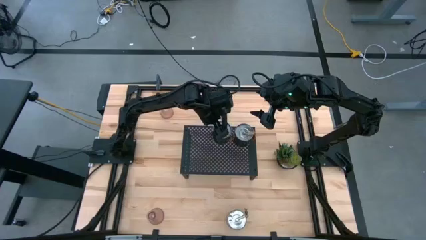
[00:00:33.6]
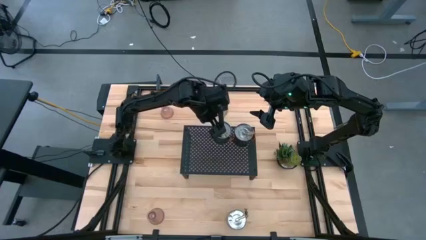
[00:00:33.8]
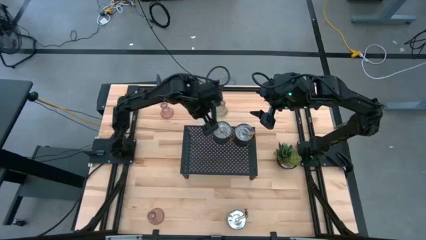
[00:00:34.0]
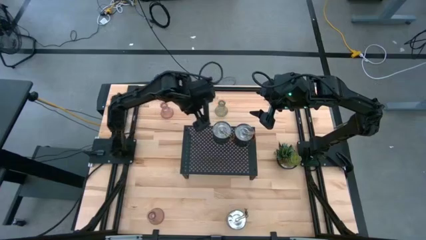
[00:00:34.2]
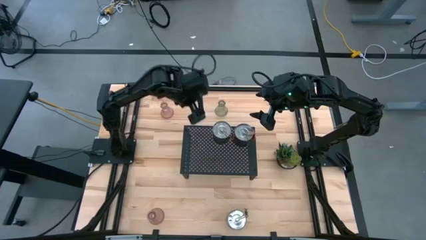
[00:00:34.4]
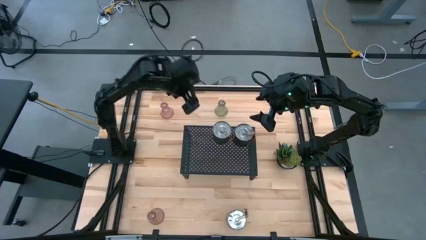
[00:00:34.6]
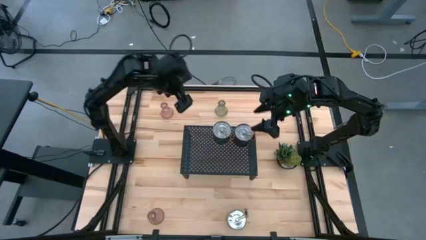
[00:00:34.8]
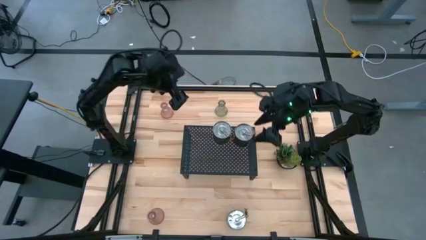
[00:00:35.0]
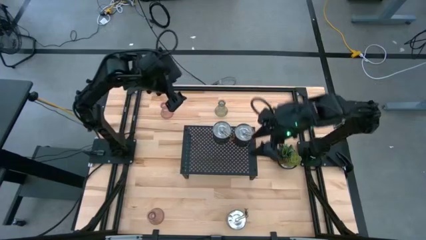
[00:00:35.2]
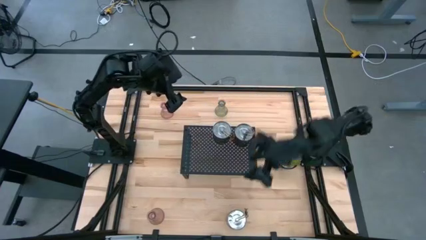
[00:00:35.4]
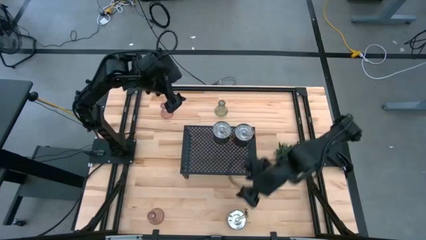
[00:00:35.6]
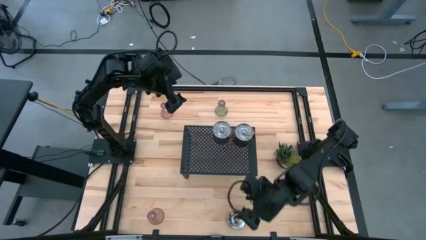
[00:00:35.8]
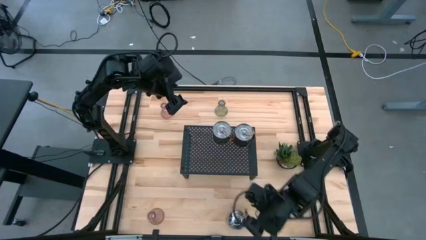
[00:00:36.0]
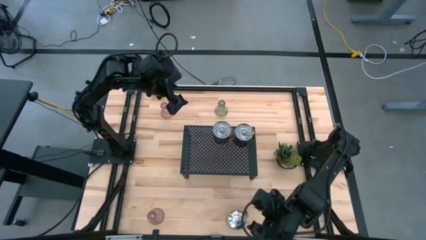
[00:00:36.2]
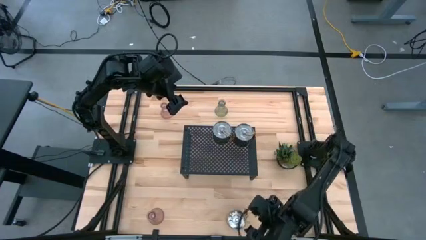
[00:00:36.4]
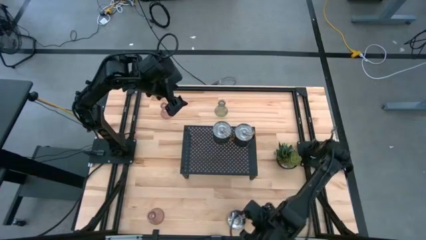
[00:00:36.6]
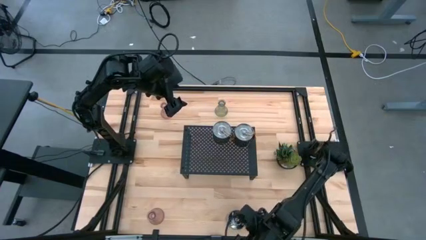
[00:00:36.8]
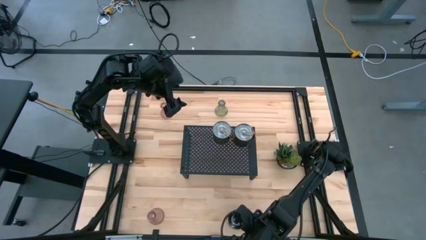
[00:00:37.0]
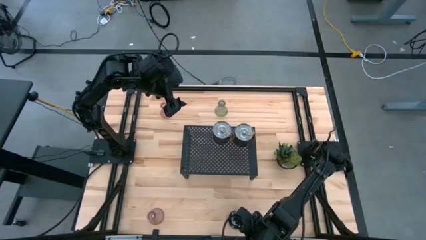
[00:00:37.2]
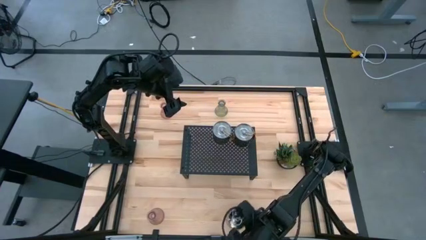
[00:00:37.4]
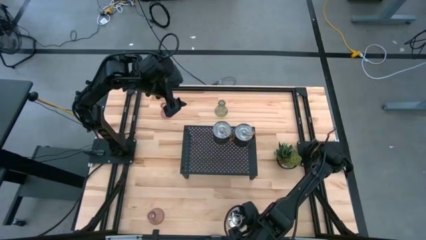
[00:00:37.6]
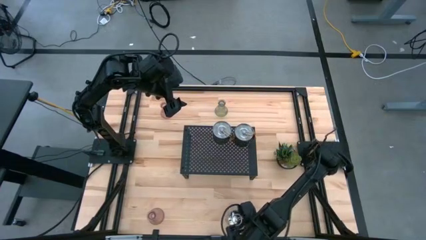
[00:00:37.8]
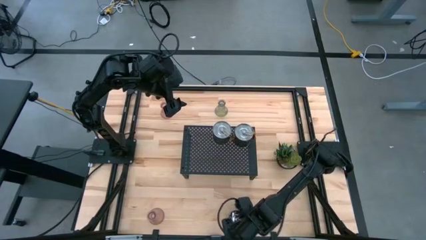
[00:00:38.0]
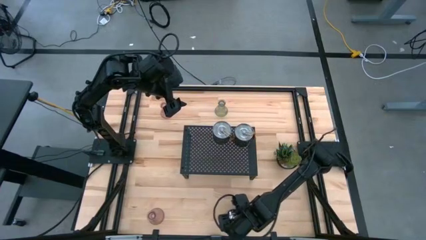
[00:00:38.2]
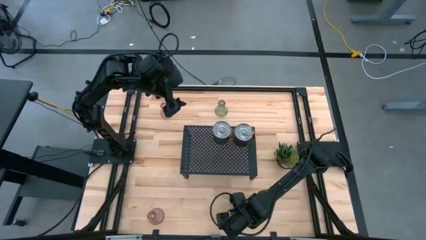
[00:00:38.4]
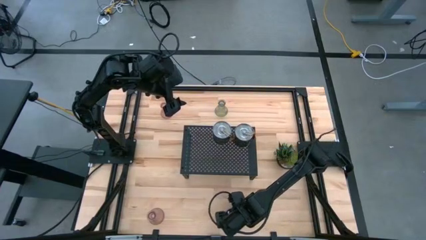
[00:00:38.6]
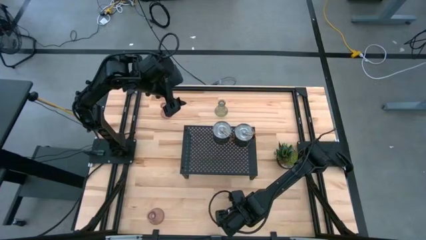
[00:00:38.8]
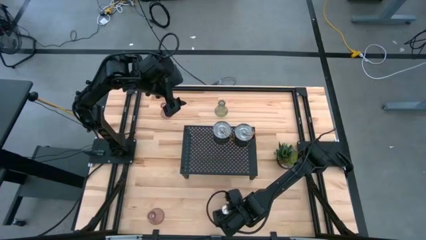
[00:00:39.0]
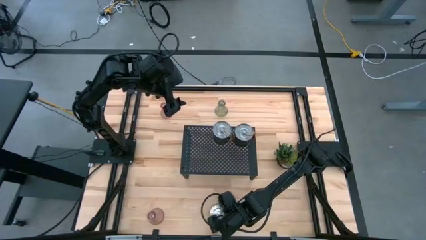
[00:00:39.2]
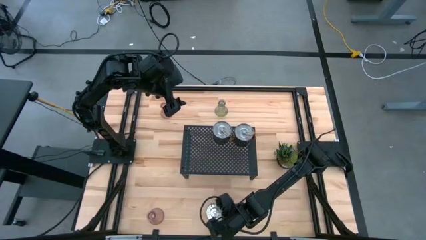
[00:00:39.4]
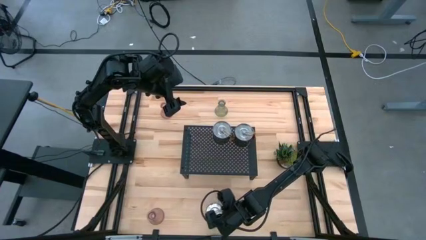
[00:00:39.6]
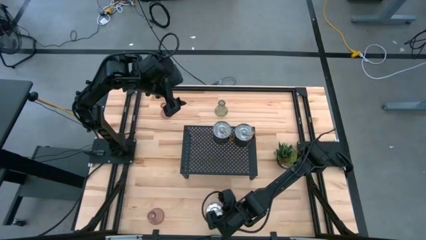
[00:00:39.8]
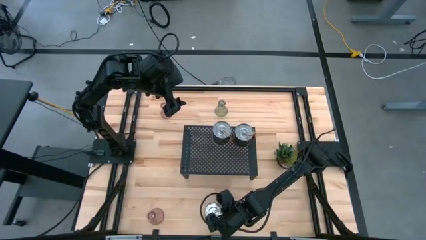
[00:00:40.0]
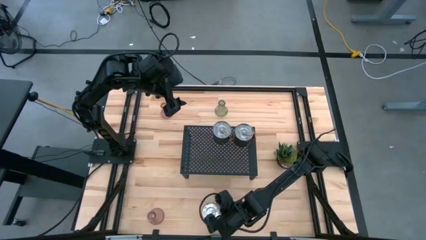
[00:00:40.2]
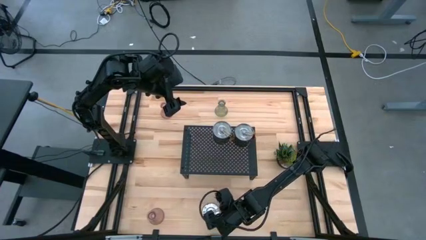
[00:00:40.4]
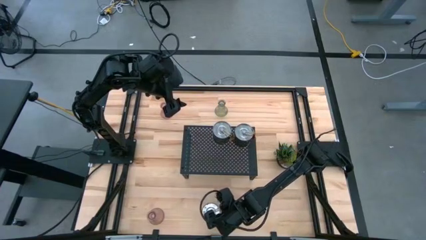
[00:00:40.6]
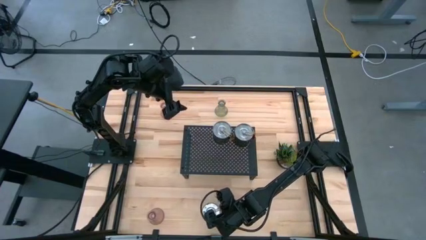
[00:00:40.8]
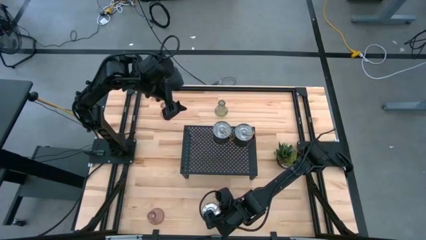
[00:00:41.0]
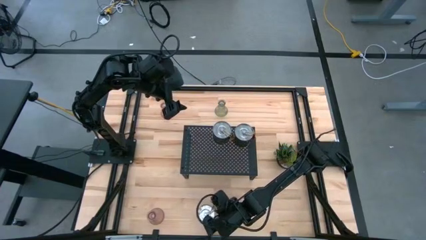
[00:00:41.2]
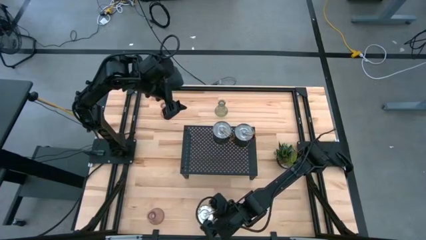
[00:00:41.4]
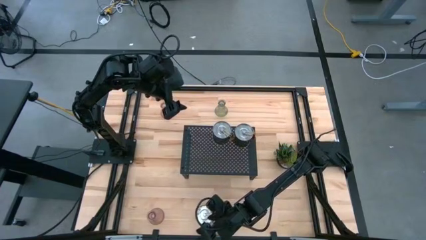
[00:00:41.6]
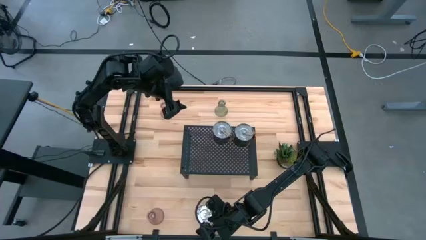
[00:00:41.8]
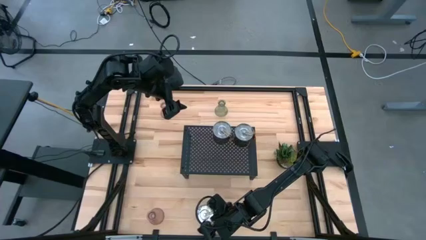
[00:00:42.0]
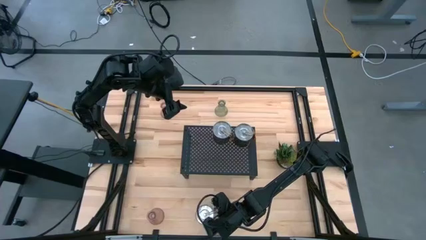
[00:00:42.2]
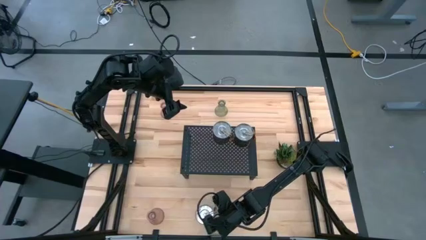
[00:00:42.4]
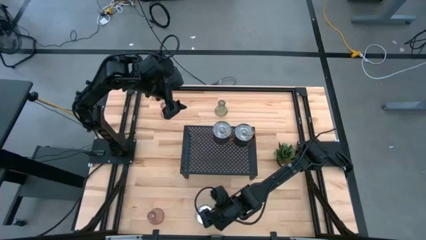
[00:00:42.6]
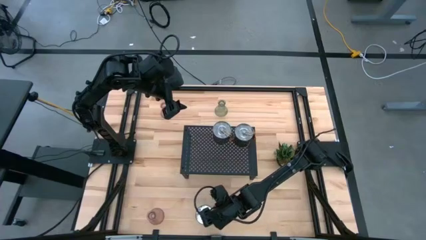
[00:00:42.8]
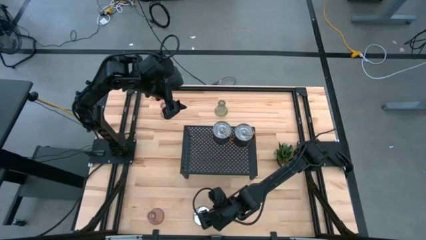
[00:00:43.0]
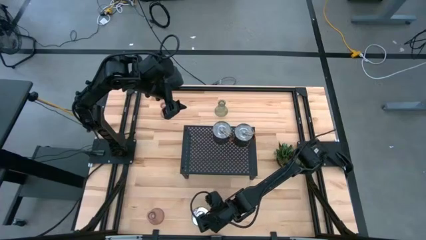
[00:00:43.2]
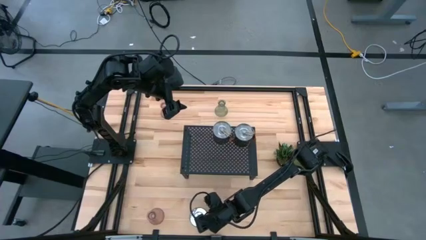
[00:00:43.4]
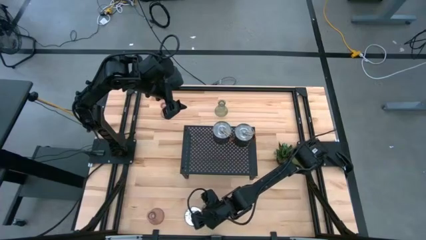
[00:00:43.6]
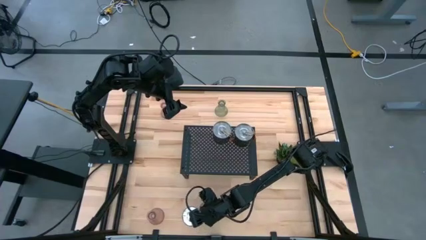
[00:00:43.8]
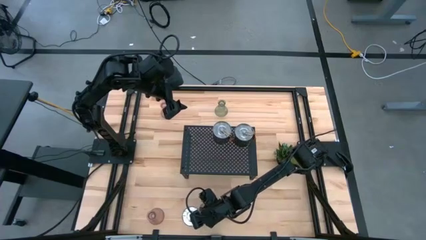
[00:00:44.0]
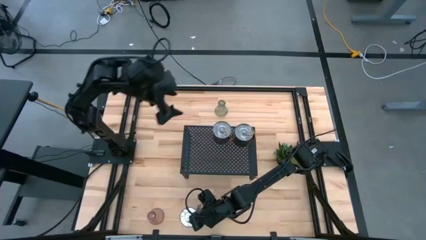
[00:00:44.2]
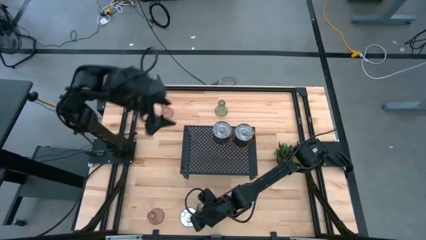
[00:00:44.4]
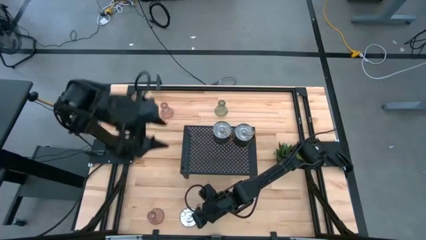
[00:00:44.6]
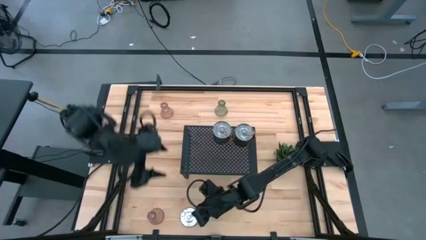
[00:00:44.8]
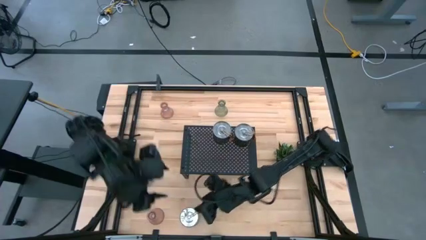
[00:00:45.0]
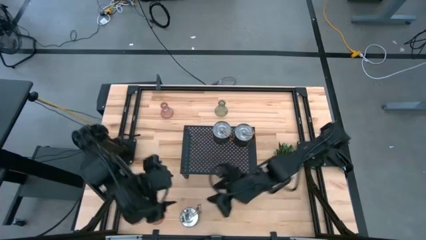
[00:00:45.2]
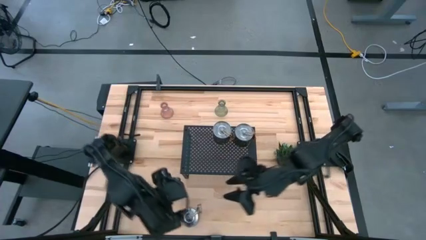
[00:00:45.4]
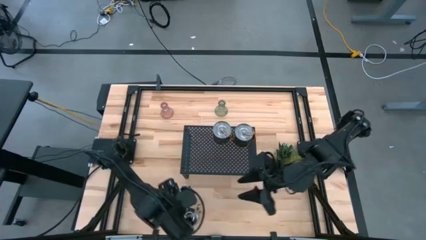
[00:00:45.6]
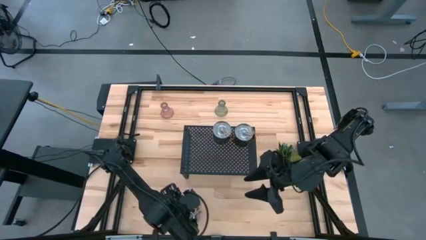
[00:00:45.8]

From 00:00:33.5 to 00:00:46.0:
Task: Pick & Place candle stick holders
Put the brown scented candle on the shelf aligned with the other scented candles
